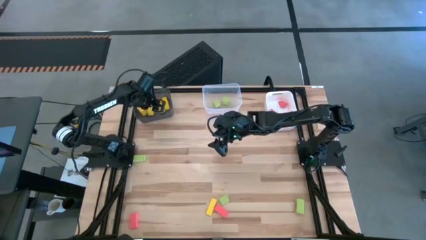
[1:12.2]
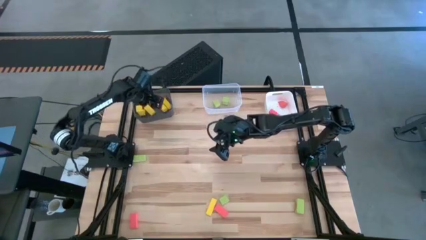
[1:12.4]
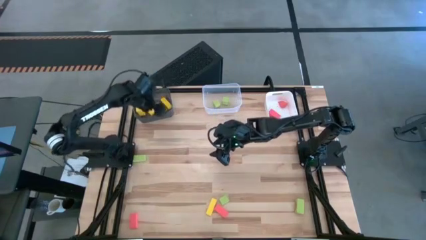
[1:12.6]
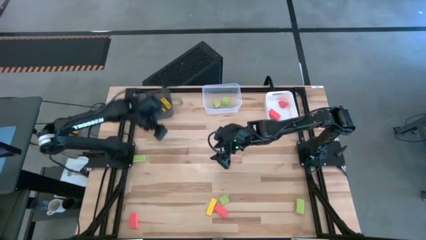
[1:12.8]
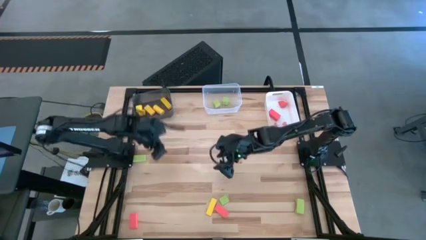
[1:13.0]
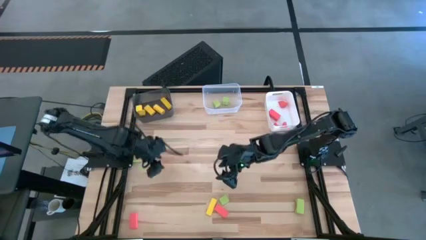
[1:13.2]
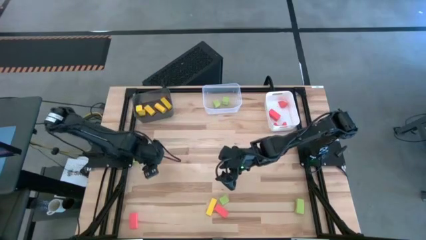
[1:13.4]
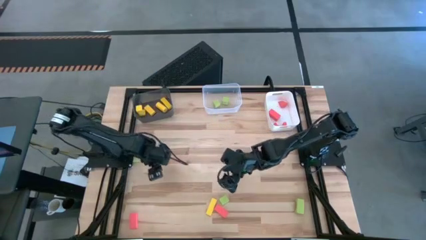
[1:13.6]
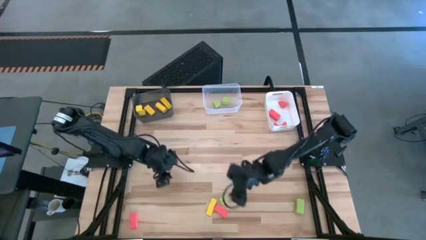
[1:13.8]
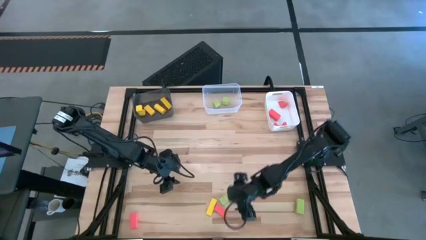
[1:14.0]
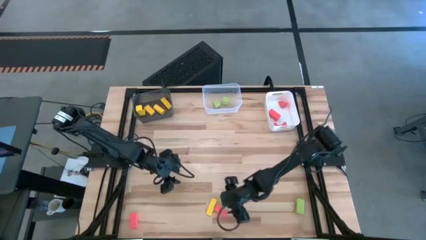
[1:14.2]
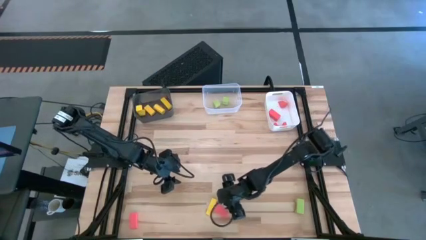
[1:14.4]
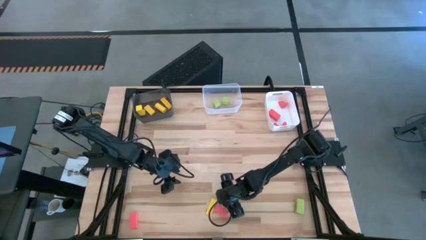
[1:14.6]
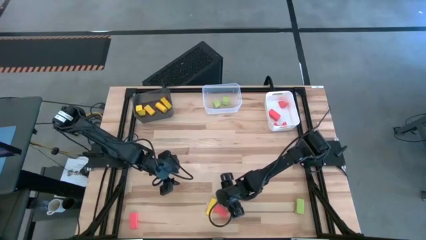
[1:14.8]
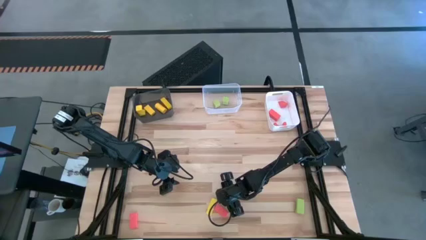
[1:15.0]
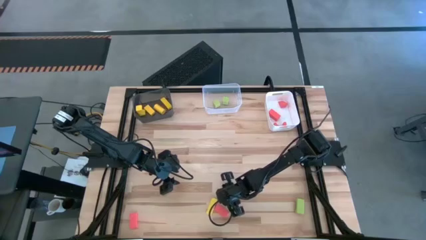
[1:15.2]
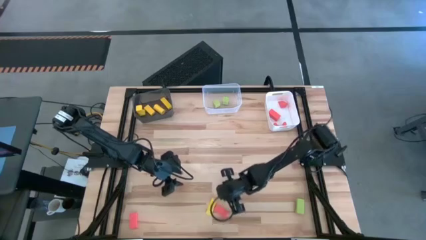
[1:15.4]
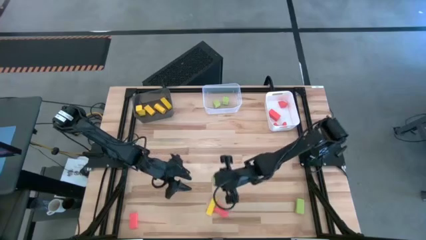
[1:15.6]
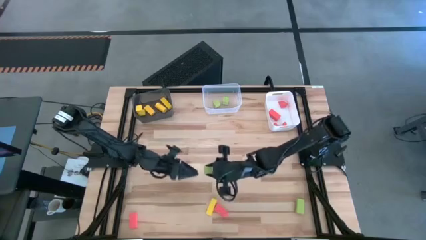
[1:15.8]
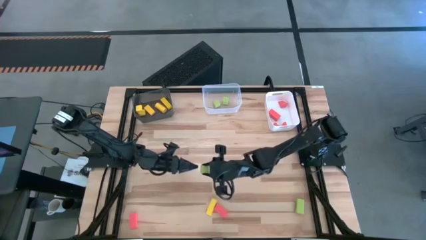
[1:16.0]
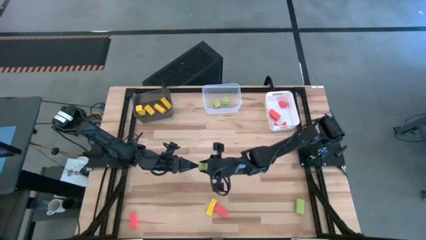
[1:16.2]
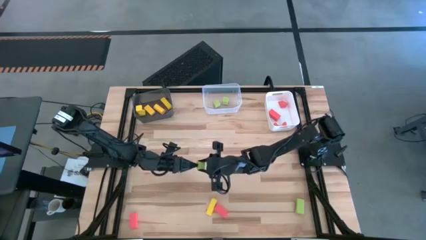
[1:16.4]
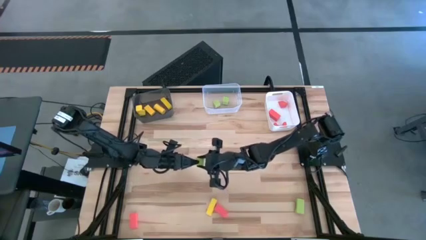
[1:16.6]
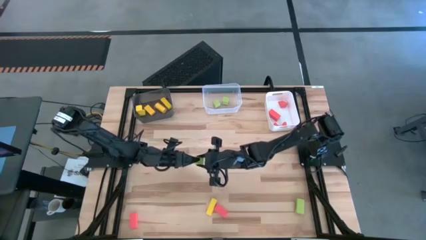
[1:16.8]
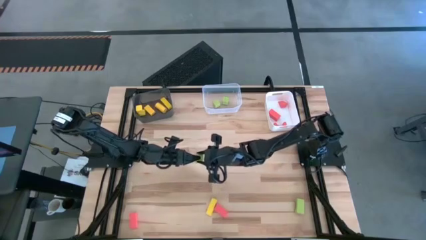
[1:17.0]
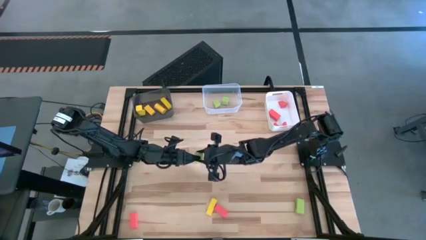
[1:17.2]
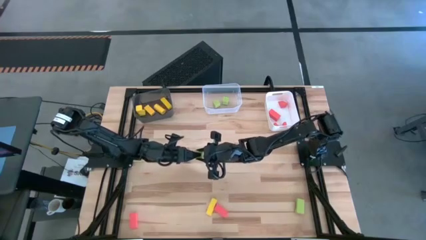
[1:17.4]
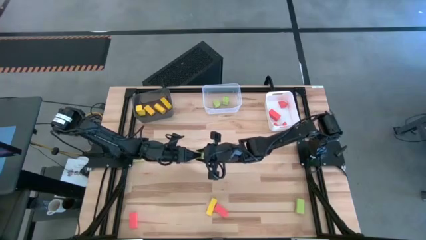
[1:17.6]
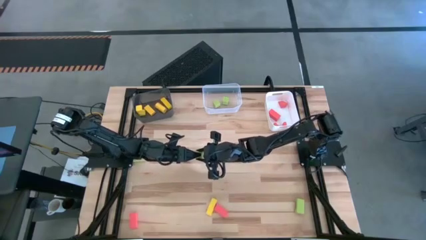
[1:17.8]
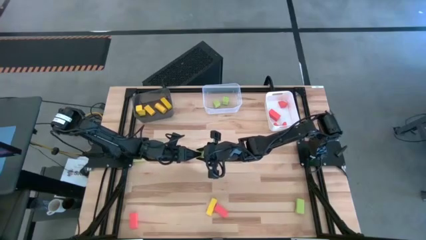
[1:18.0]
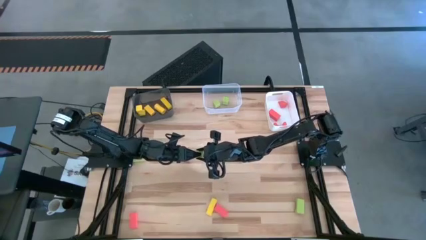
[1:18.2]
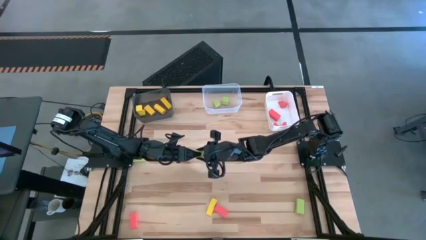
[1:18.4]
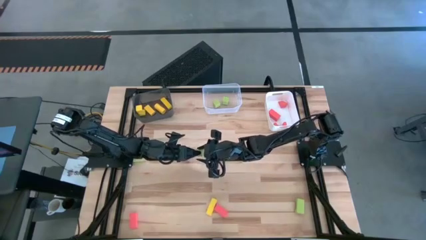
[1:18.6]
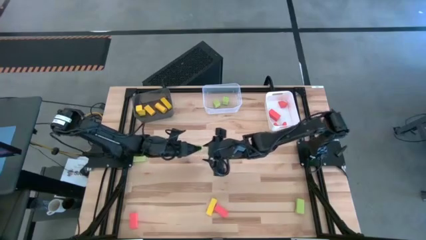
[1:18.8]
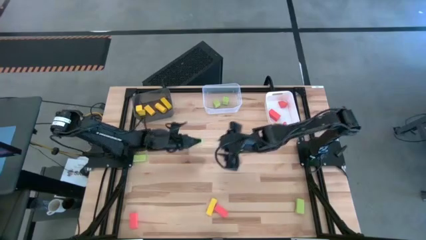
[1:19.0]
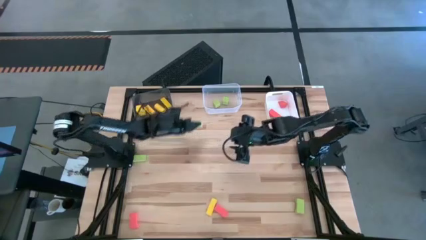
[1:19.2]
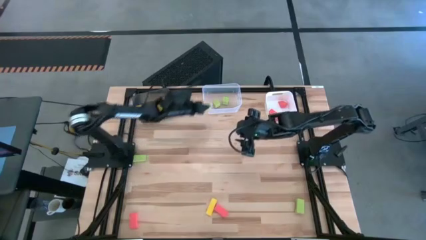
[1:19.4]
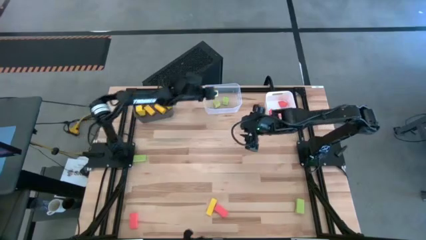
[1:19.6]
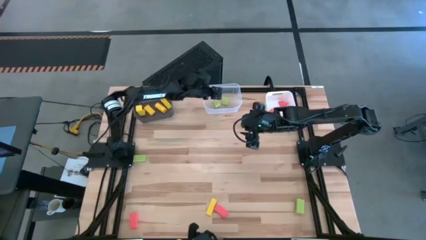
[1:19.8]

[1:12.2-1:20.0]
Task: Sort & place blocks by color
Put the green block into the transparent bin

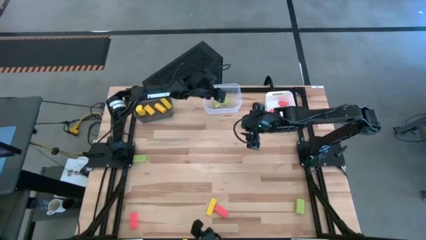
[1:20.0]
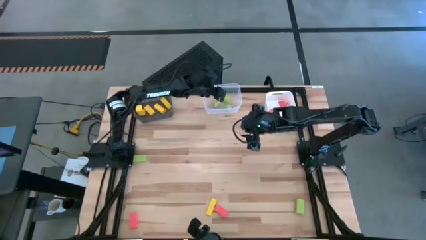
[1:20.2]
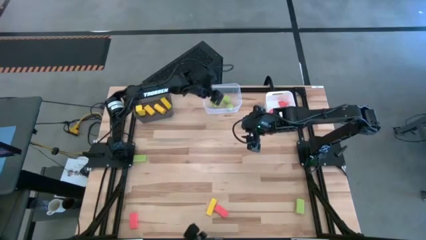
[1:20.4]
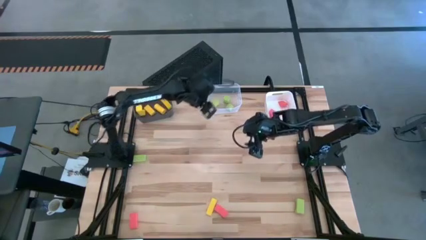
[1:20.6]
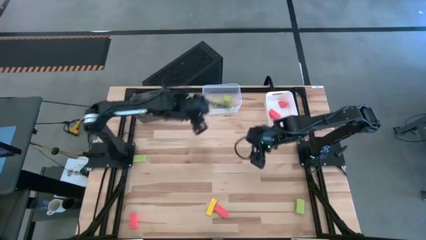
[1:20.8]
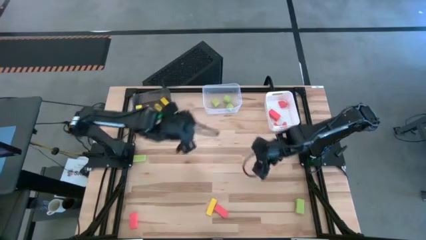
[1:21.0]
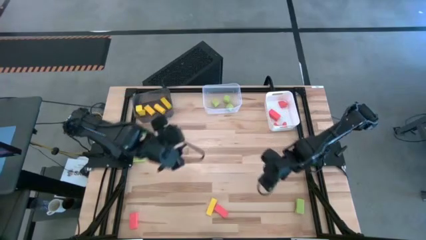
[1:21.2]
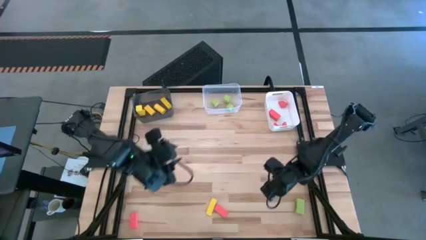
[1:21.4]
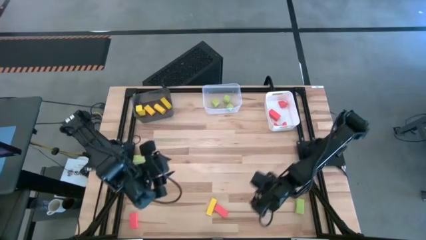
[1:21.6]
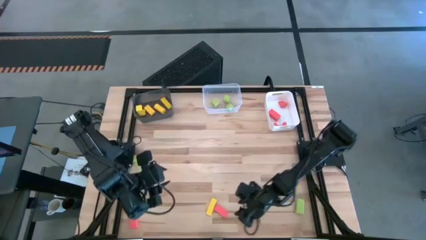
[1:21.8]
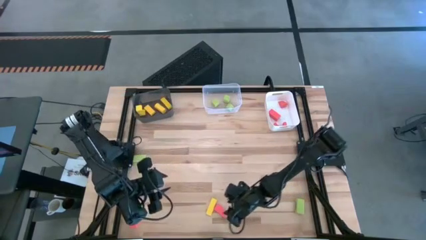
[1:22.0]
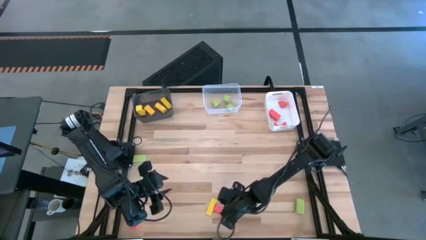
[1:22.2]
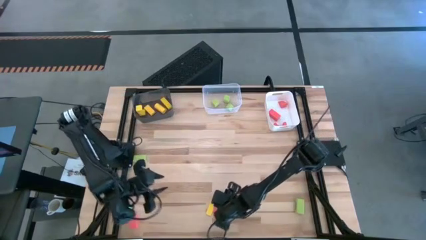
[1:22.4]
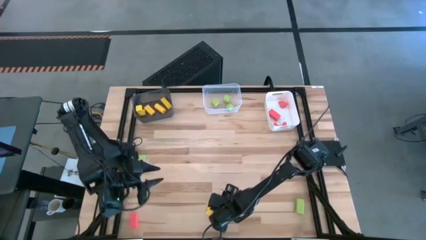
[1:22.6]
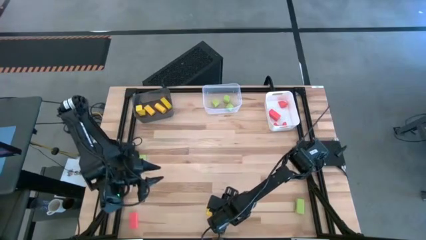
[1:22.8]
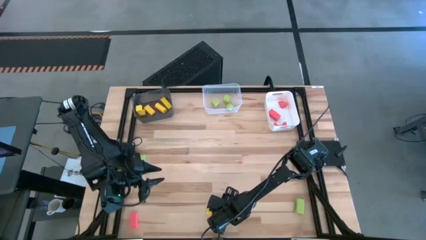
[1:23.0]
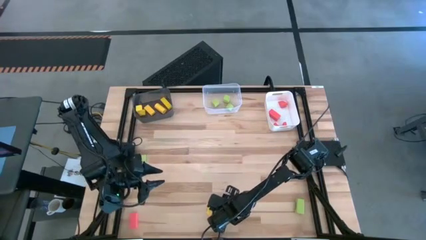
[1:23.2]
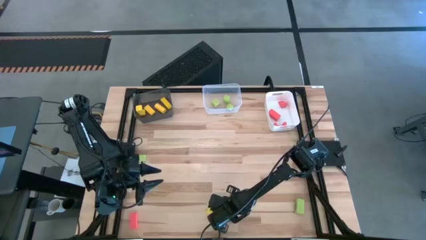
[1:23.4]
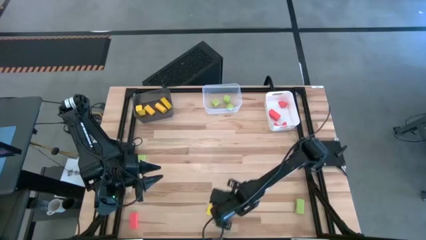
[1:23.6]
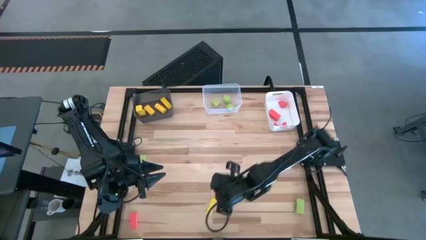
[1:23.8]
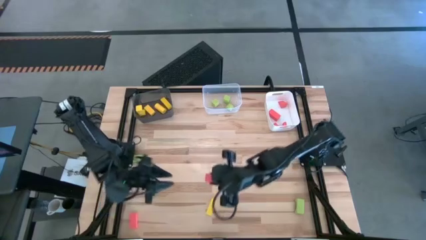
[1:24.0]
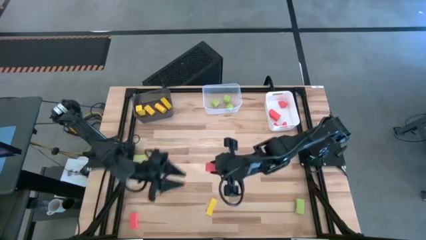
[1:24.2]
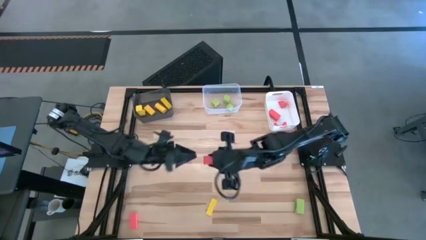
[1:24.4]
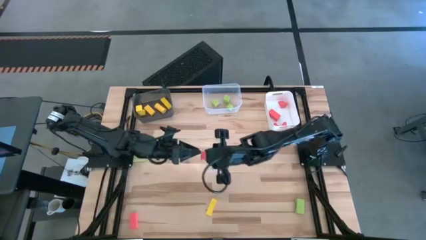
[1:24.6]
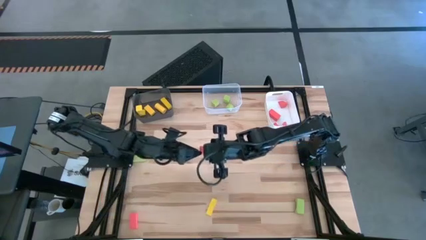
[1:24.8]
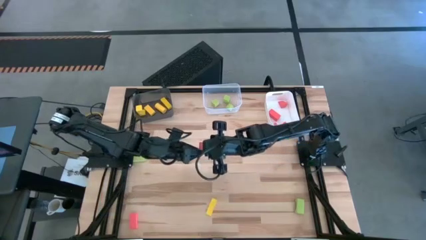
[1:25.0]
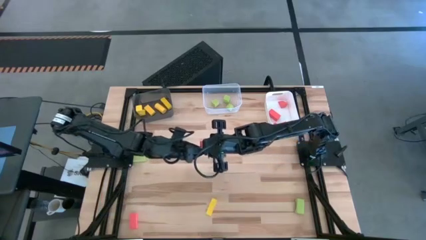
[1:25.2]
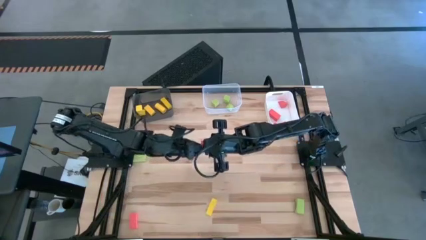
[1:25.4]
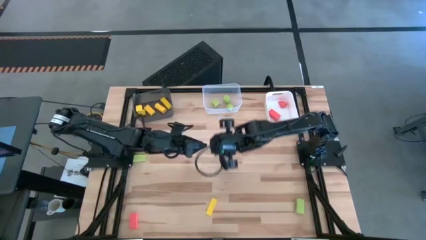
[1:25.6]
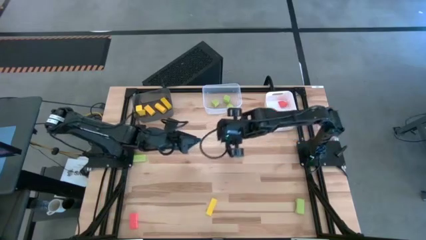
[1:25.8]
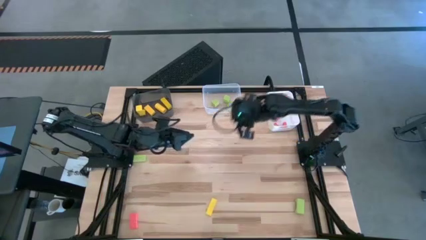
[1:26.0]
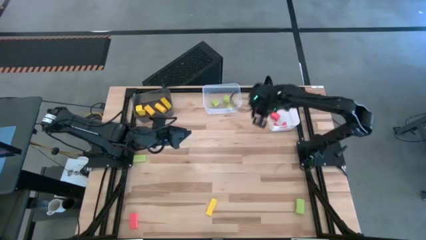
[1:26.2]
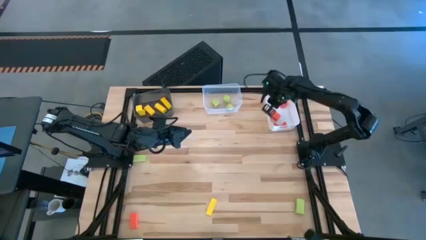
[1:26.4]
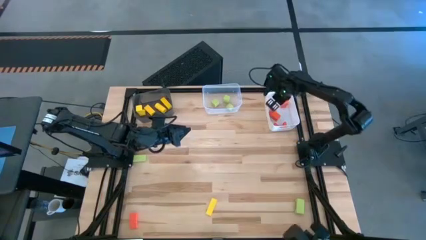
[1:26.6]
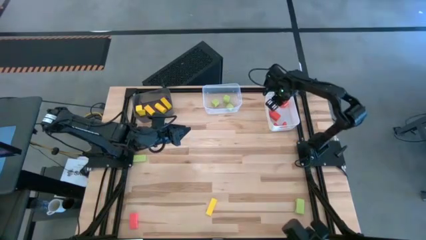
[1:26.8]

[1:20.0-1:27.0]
Put the orange block into the white bin
